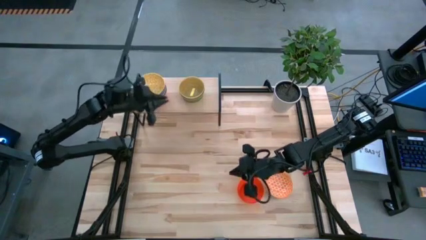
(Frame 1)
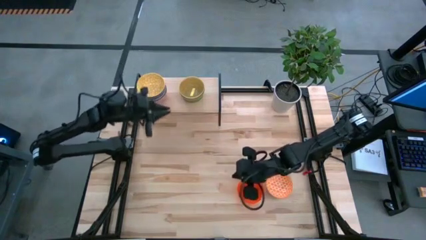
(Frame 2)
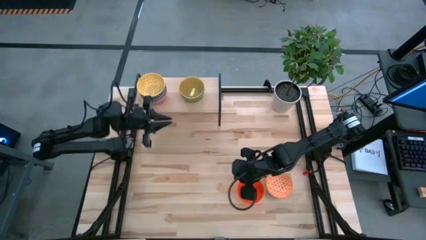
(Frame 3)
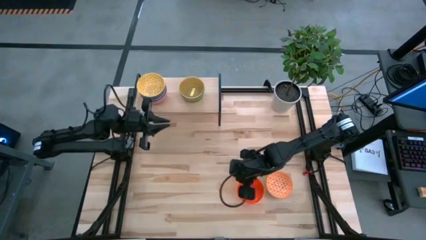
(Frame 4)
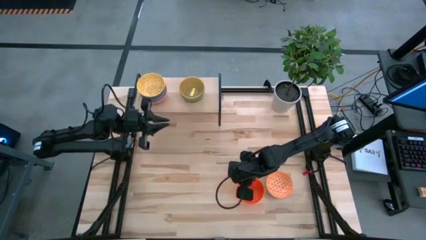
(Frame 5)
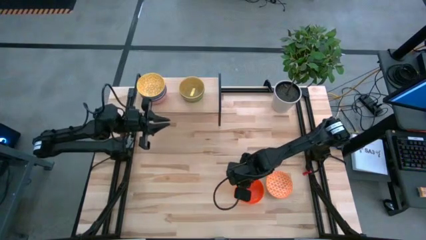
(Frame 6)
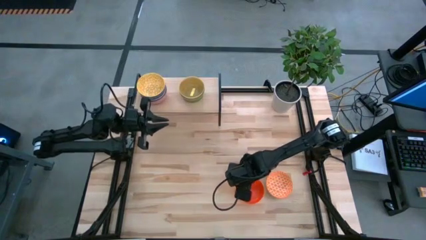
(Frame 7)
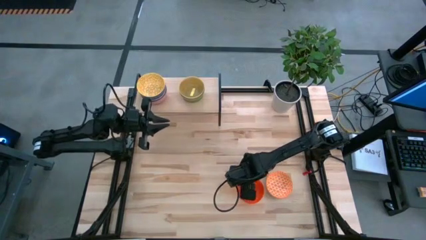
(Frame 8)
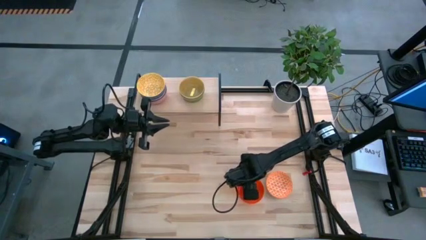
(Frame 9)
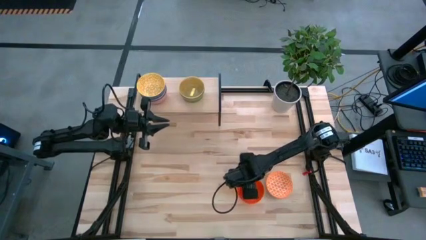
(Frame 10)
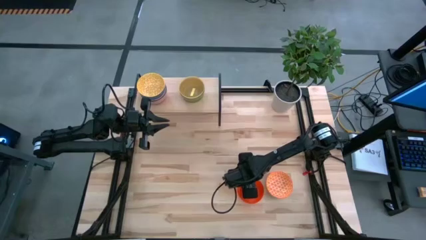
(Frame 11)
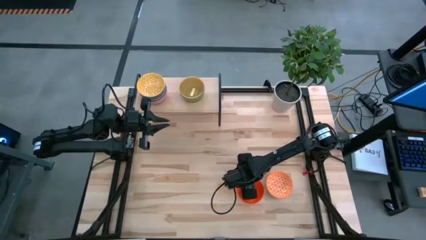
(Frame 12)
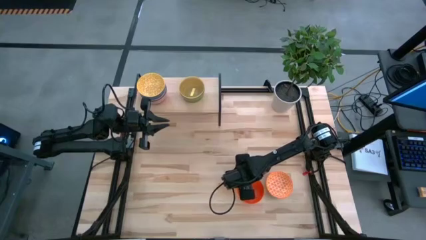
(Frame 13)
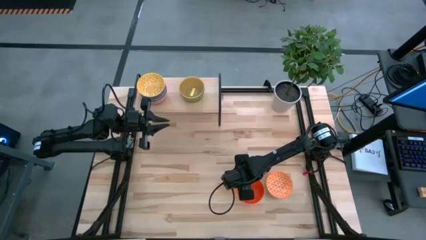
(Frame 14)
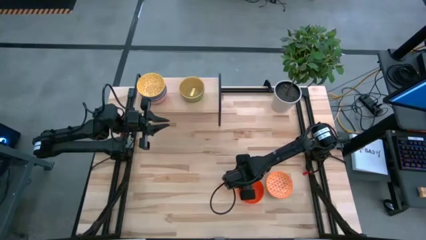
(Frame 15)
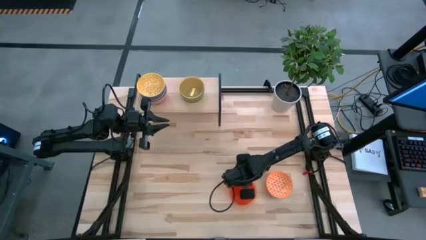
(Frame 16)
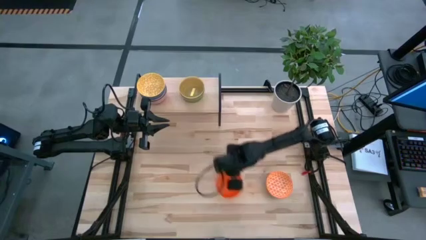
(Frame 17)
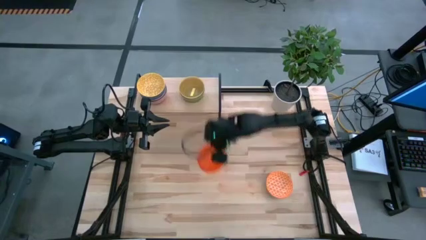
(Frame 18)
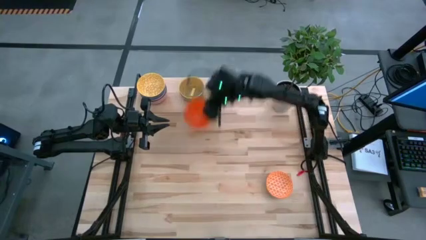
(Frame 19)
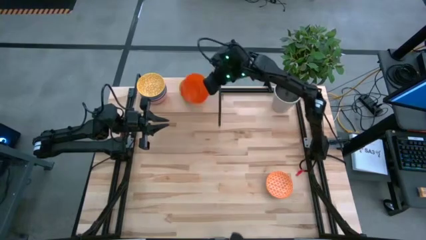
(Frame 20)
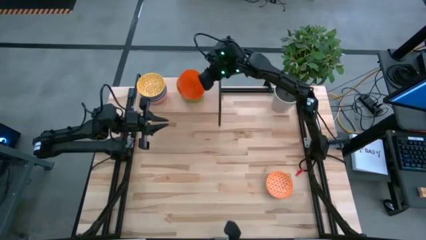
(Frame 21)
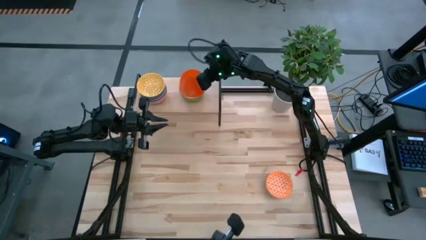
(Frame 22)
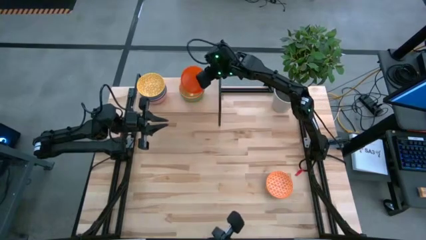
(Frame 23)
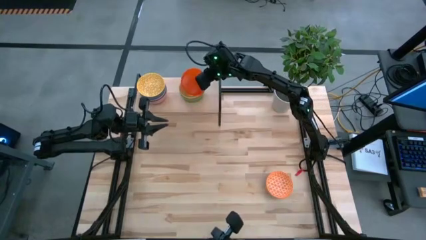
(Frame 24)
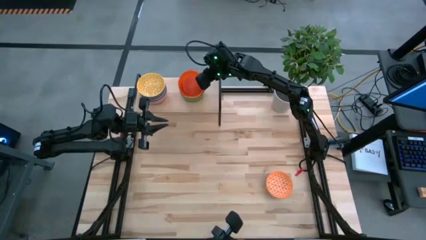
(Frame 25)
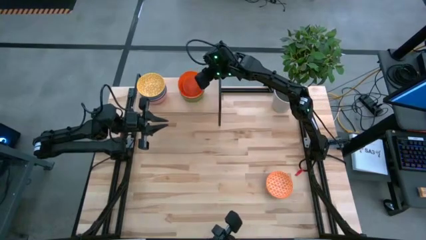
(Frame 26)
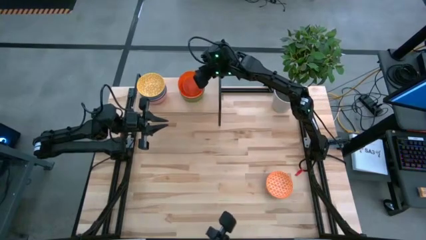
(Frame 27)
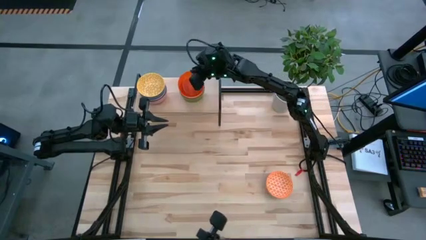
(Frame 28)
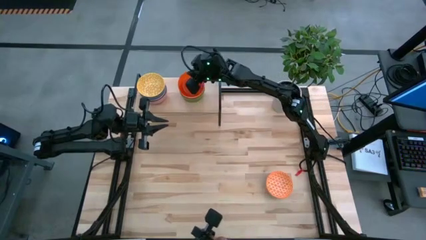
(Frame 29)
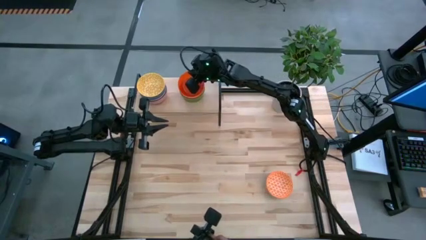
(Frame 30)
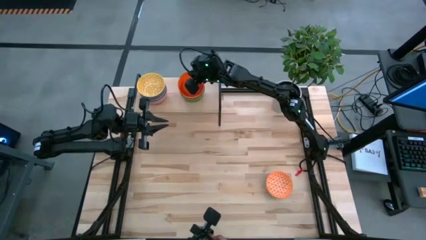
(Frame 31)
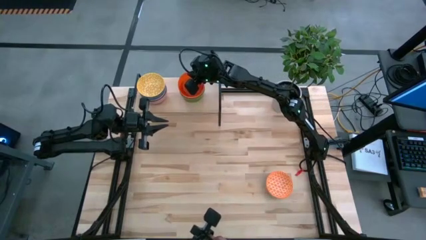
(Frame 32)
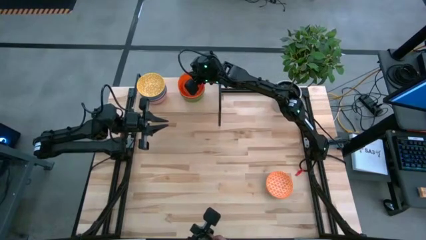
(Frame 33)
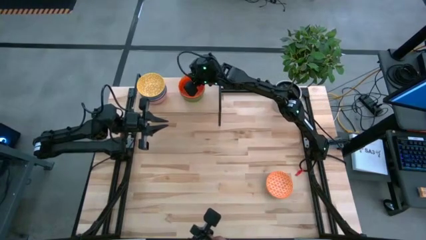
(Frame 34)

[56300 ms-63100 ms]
Task: Place and stack bowls onto a shelf
Stack the dark orange bowl on top of the light yellow bowl on the shelf

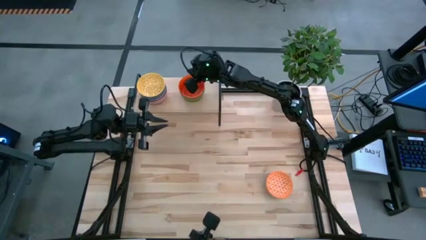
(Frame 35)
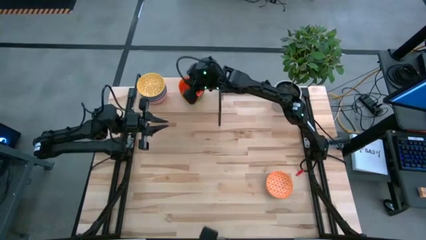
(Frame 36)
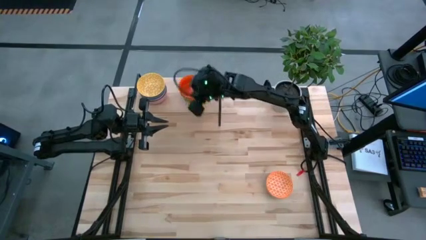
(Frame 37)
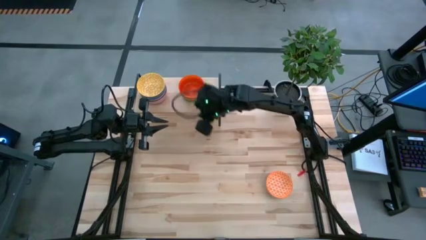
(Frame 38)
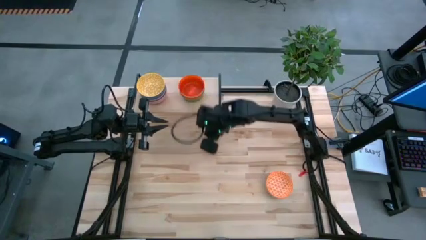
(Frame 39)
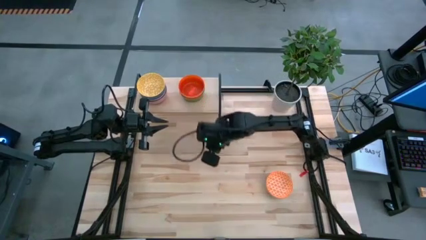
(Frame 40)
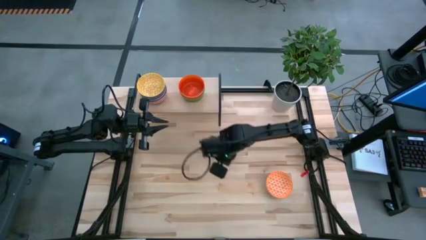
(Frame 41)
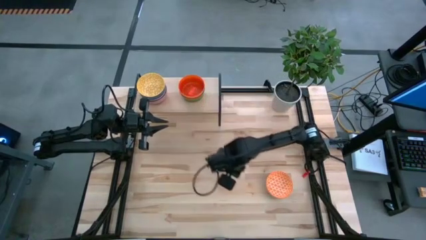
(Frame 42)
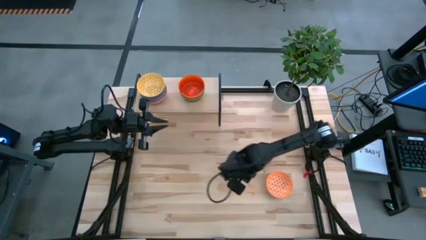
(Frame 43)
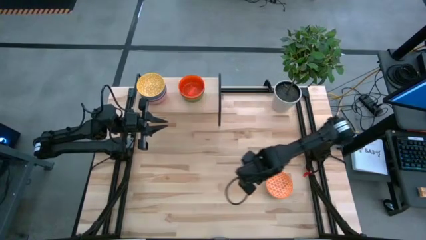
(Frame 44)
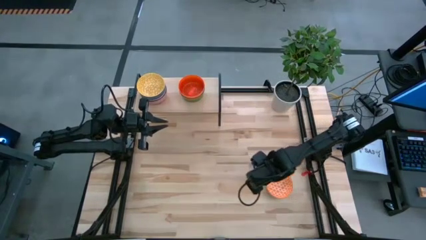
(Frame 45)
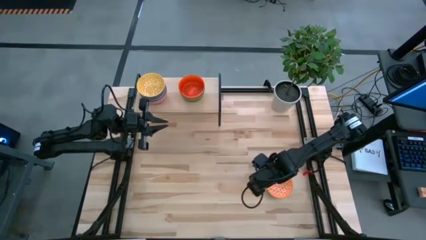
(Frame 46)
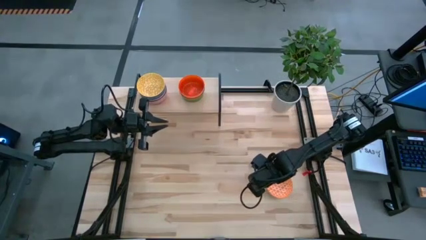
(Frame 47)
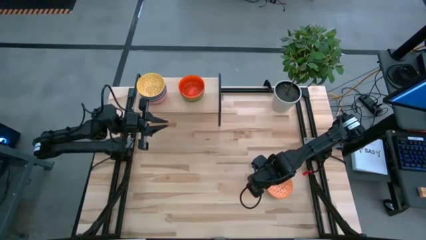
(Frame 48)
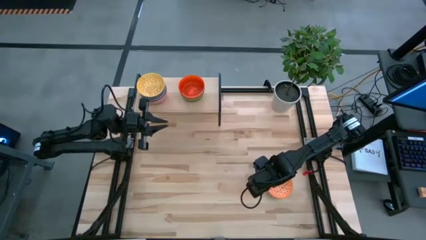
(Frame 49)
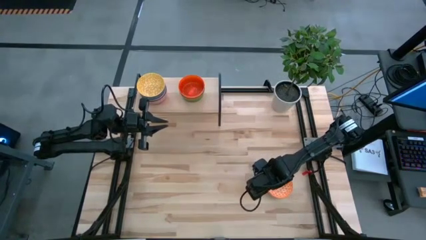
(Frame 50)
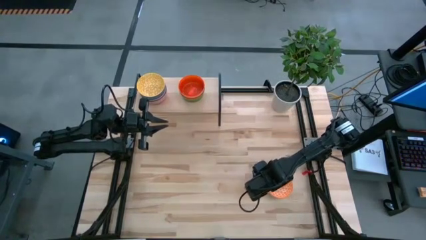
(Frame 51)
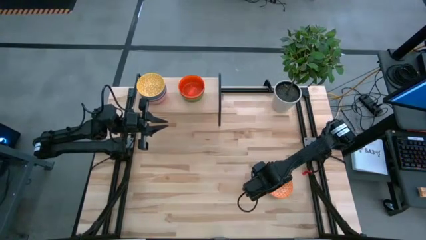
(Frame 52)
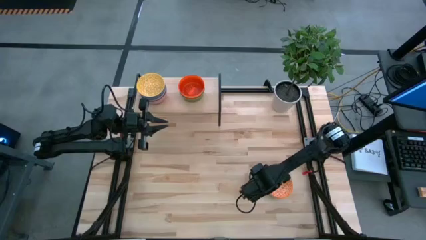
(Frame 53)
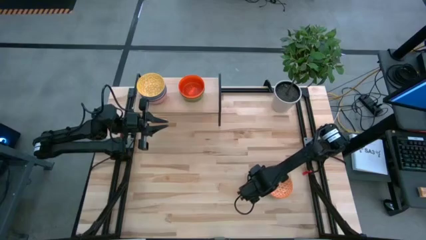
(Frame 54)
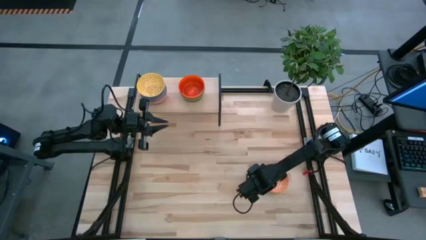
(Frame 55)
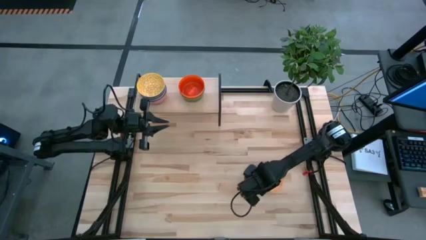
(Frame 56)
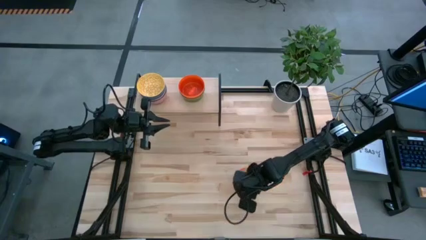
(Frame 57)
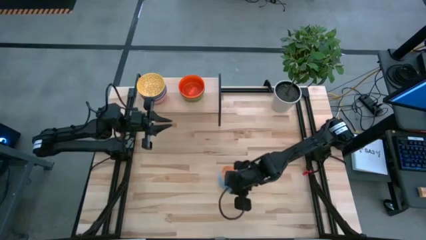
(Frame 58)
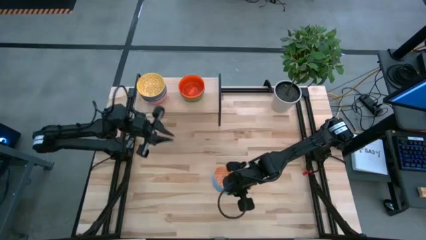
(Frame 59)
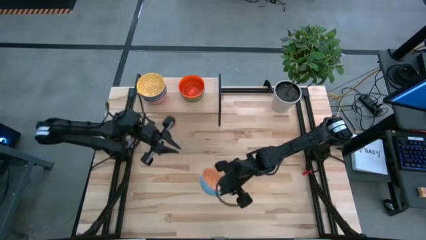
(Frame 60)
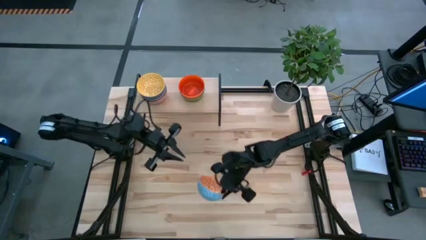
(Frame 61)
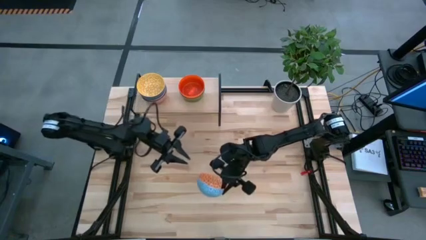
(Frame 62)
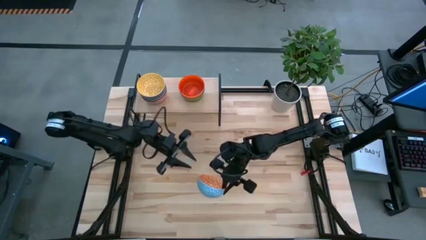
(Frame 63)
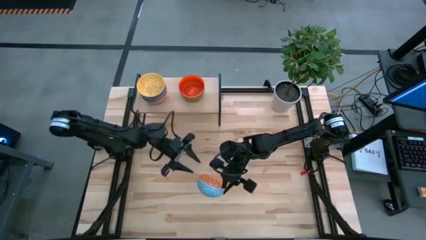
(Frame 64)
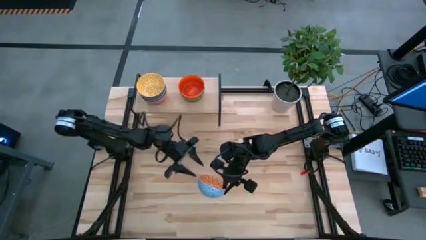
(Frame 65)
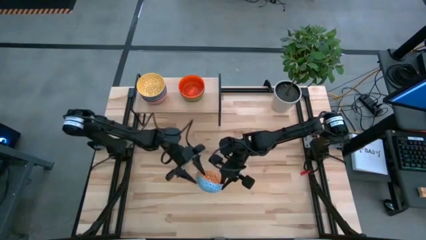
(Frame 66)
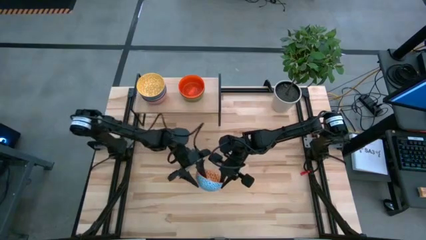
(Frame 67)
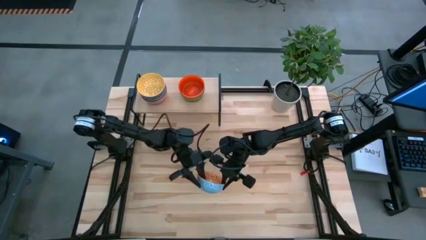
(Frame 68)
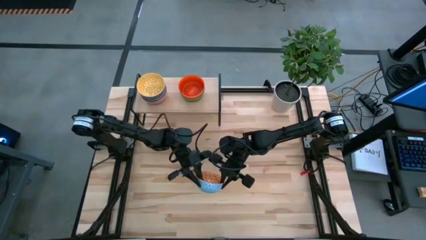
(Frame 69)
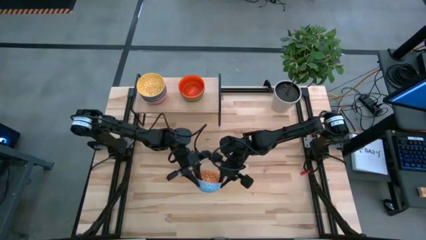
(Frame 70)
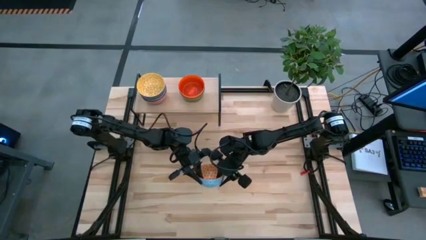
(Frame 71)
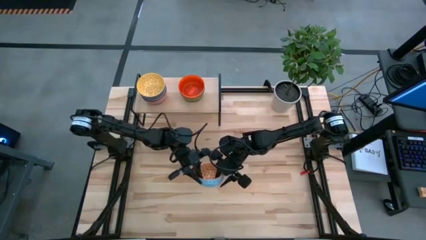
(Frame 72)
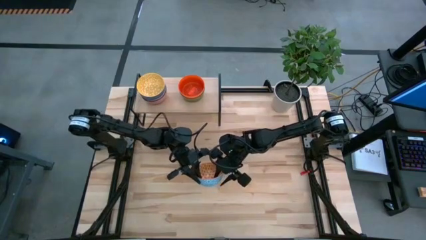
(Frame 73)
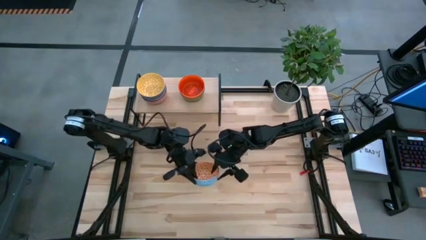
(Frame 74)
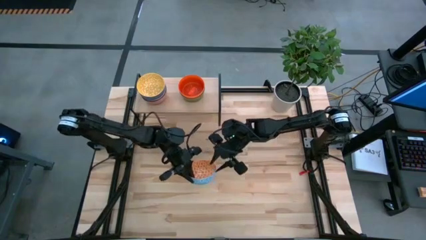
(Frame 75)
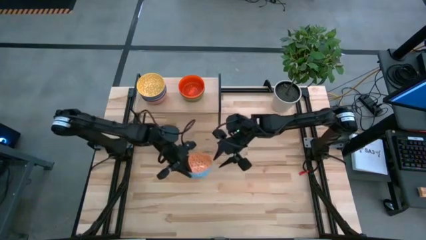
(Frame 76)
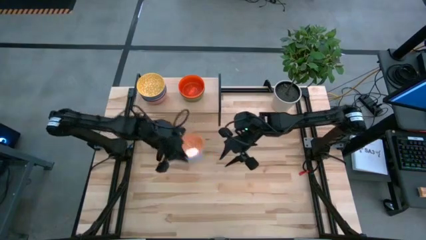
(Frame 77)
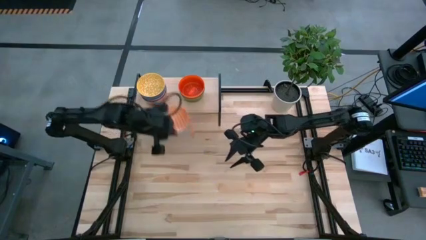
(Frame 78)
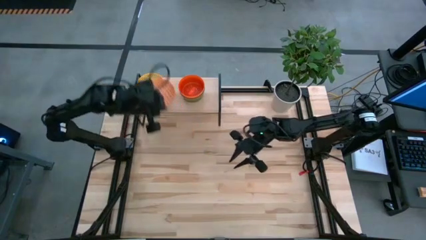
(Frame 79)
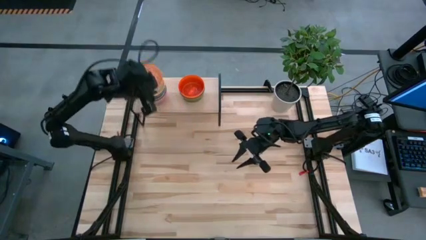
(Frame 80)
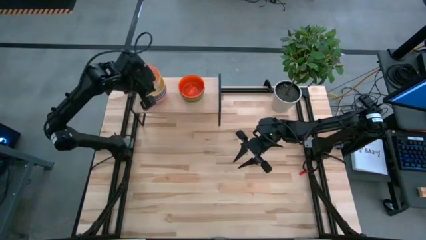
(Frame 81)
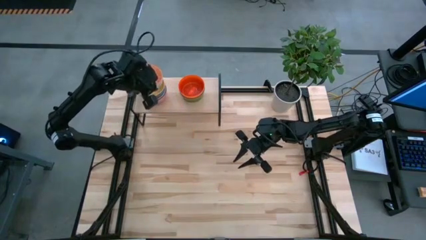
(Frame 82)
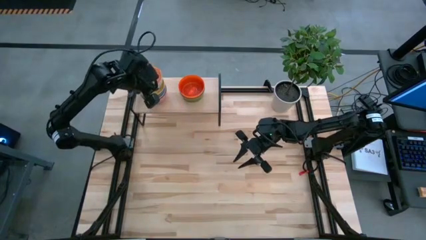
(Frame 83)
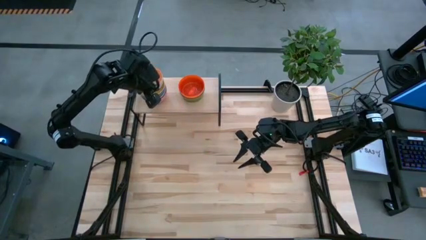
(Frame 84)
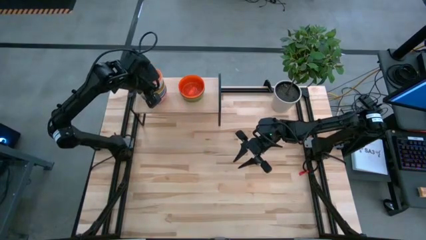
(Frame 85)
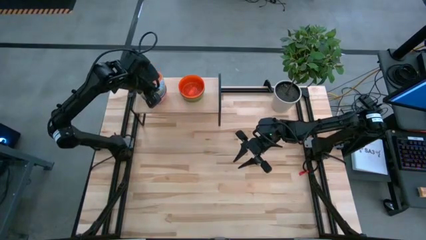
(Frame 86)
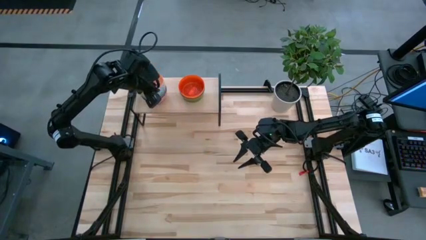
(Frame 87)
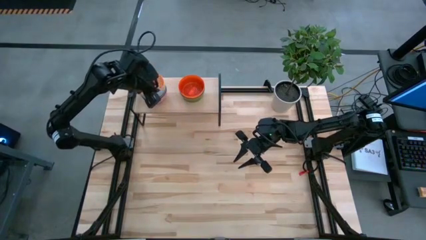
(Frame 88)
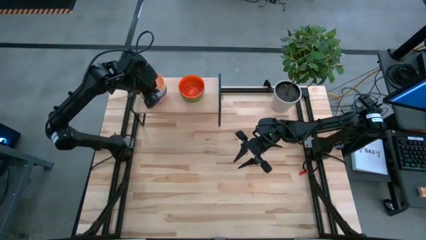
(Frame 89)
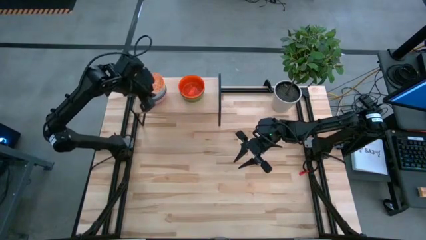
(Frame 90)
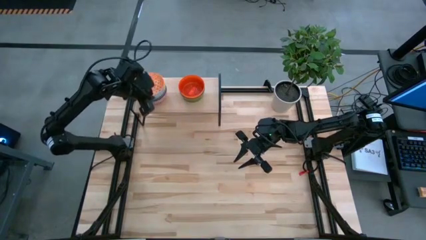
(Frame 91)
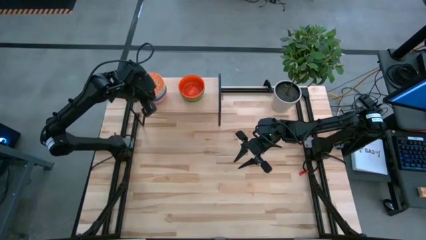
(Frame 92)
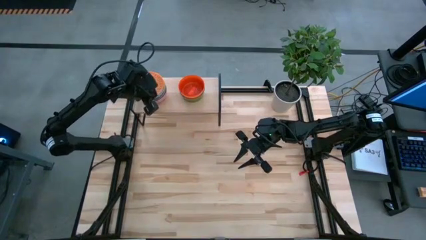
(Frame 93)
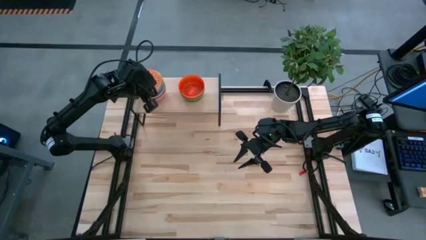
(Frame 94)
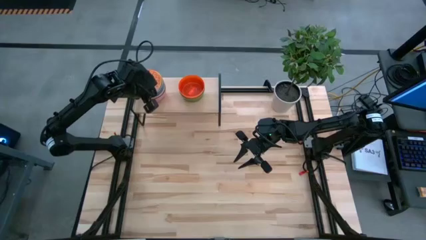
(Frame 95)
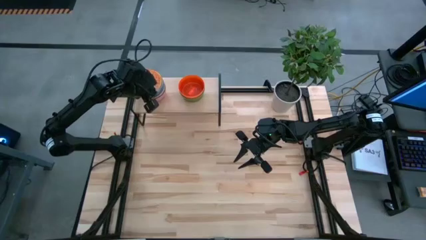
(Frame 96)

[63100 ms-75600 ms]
Stack the orange bowl on top of the yellow bowl on the shelf
